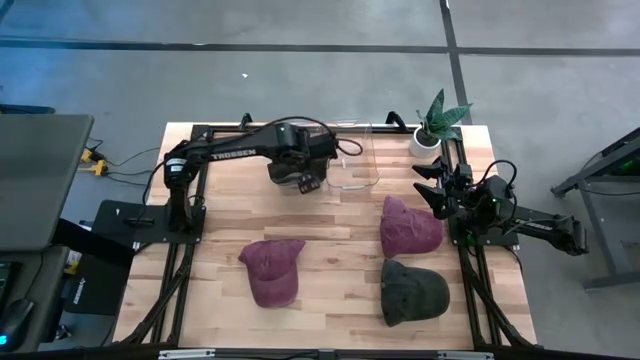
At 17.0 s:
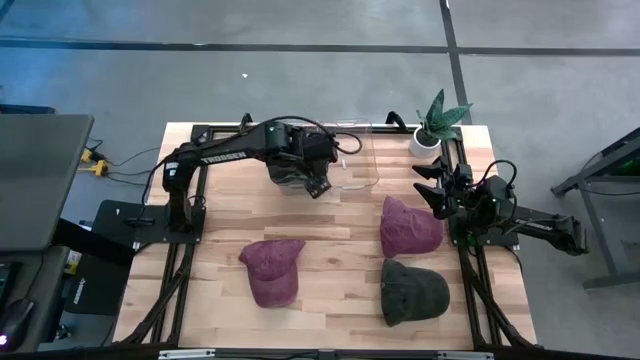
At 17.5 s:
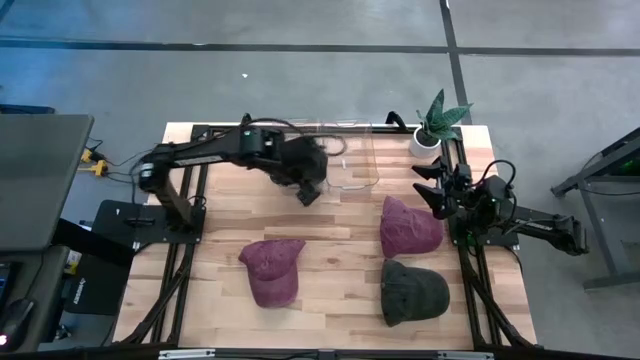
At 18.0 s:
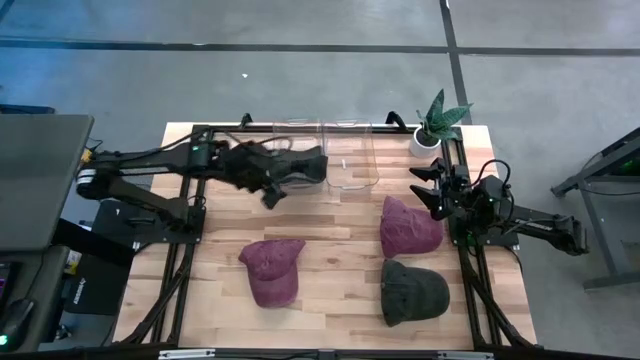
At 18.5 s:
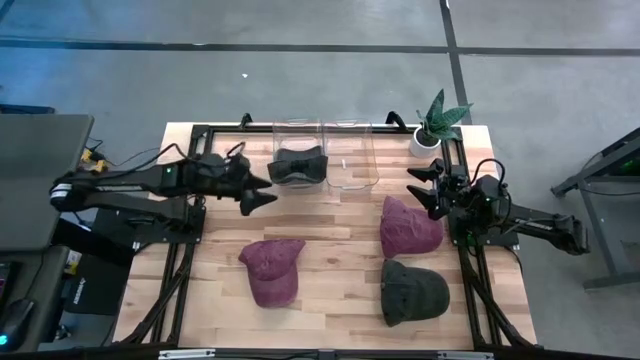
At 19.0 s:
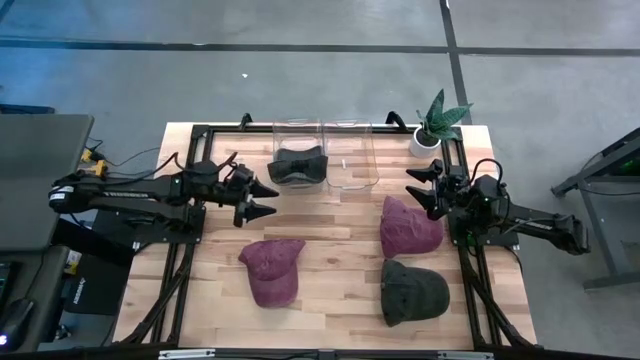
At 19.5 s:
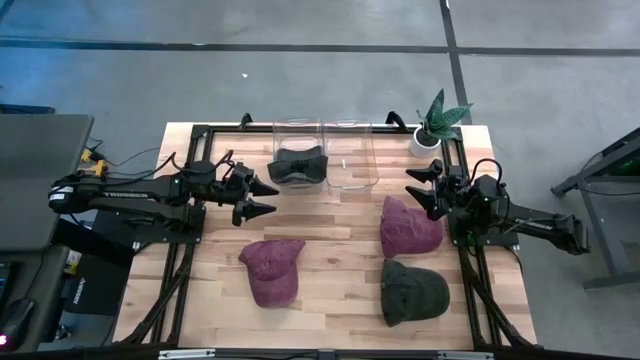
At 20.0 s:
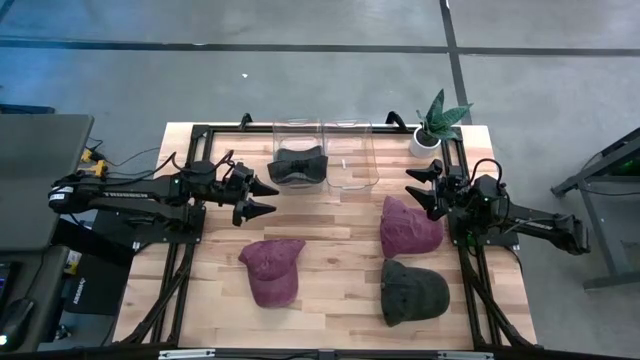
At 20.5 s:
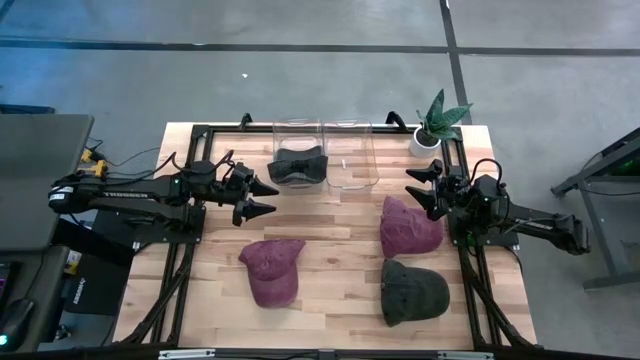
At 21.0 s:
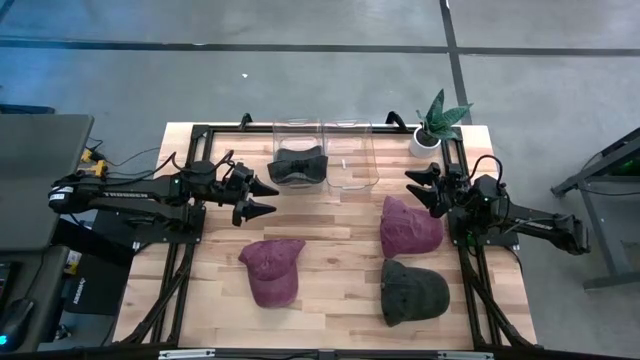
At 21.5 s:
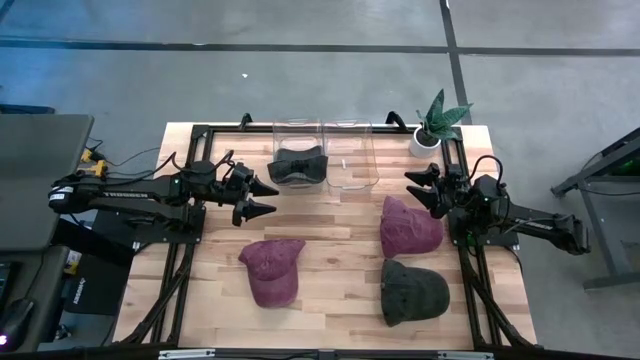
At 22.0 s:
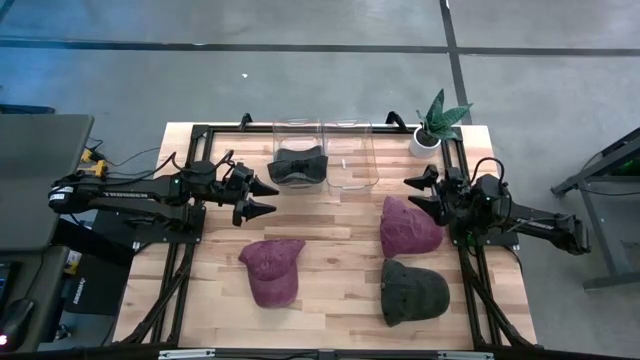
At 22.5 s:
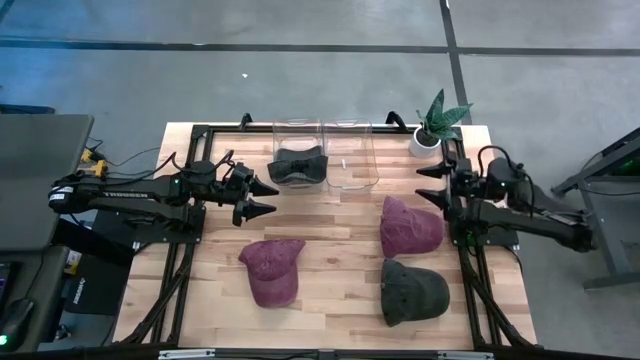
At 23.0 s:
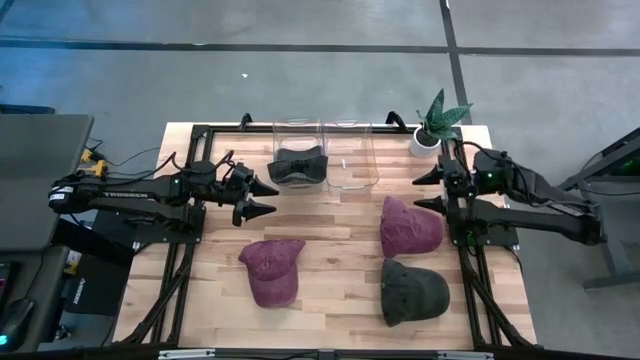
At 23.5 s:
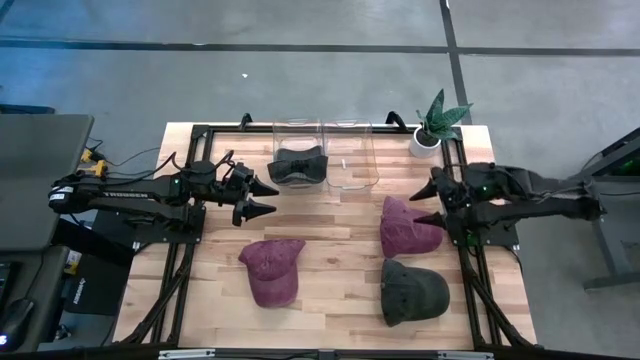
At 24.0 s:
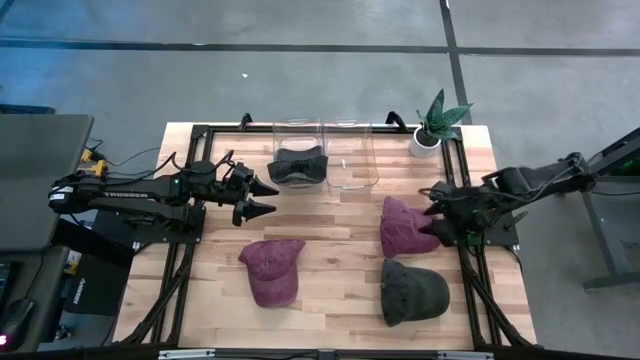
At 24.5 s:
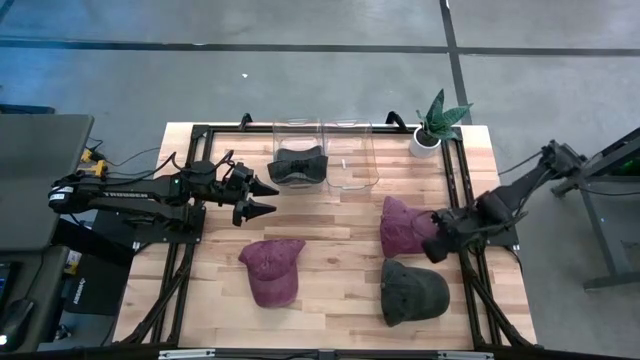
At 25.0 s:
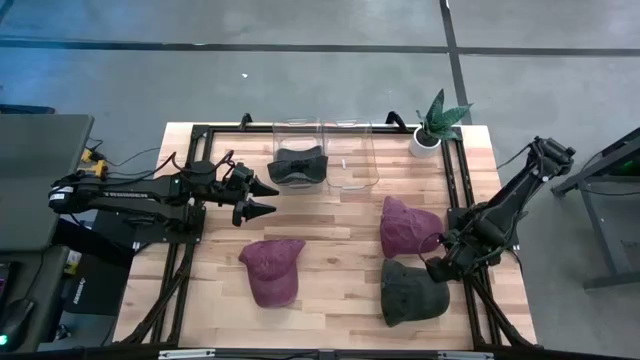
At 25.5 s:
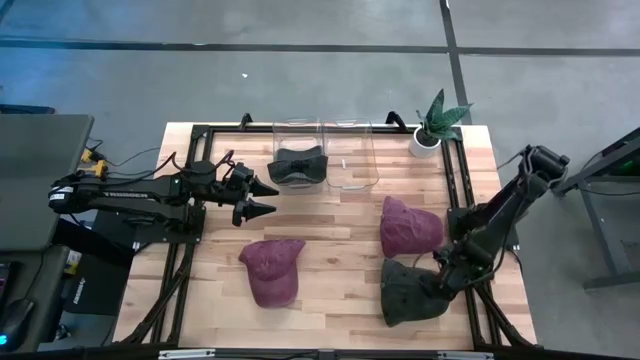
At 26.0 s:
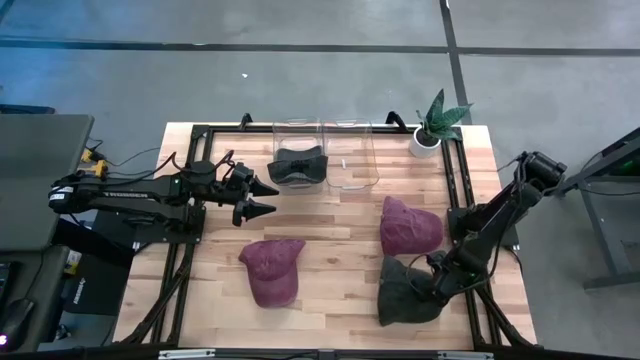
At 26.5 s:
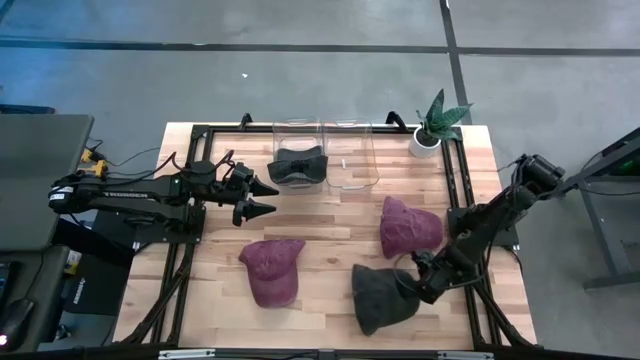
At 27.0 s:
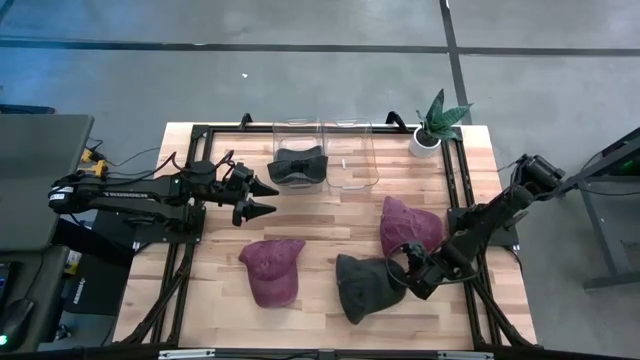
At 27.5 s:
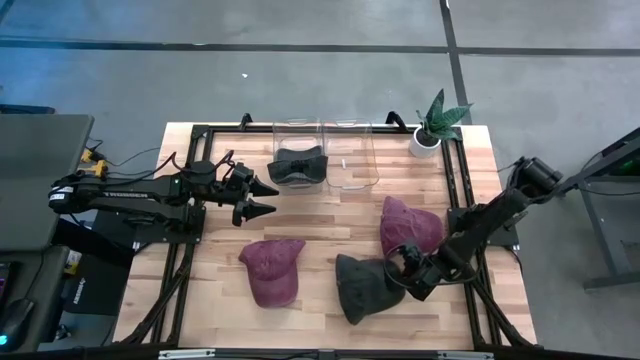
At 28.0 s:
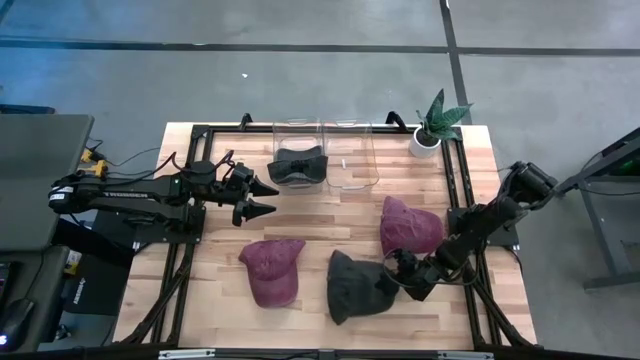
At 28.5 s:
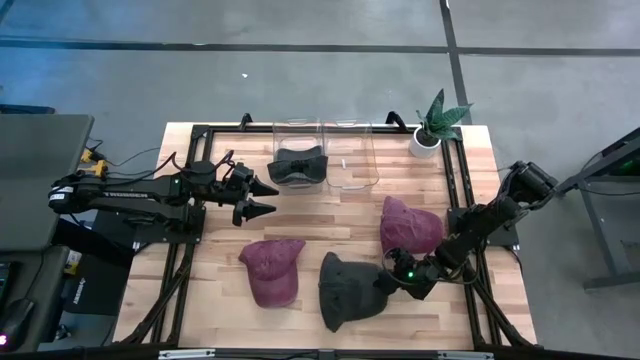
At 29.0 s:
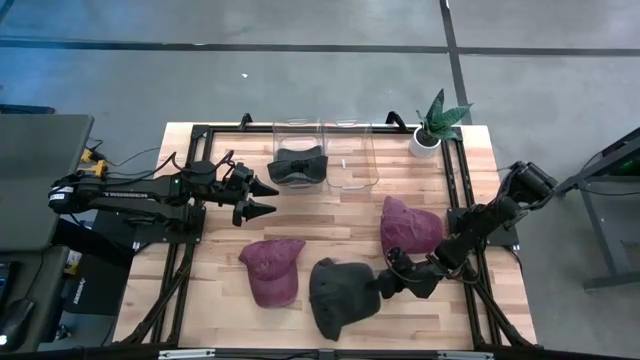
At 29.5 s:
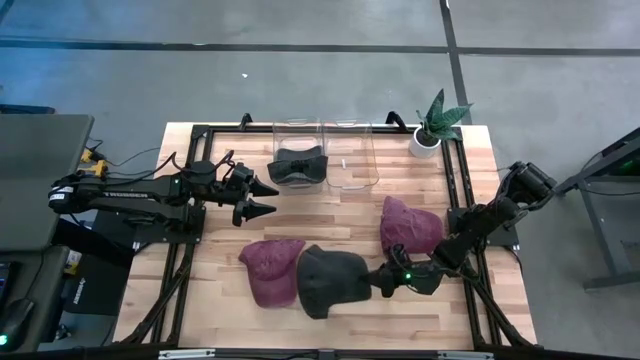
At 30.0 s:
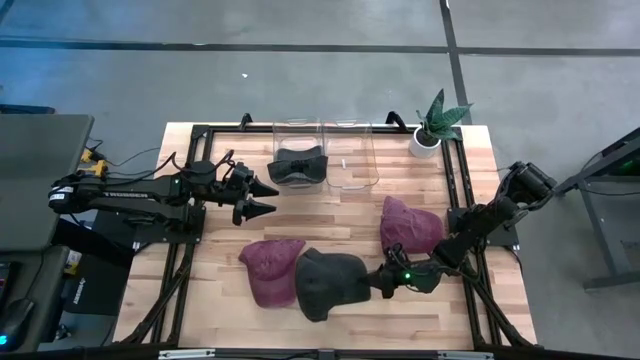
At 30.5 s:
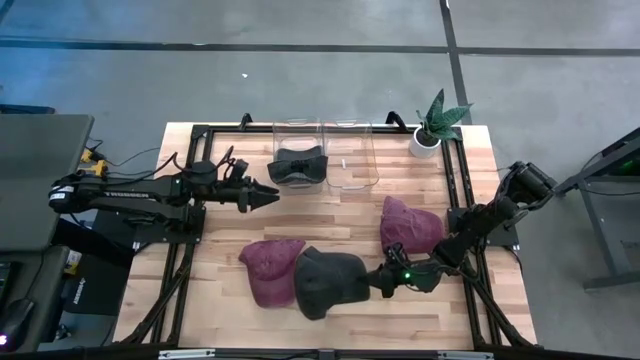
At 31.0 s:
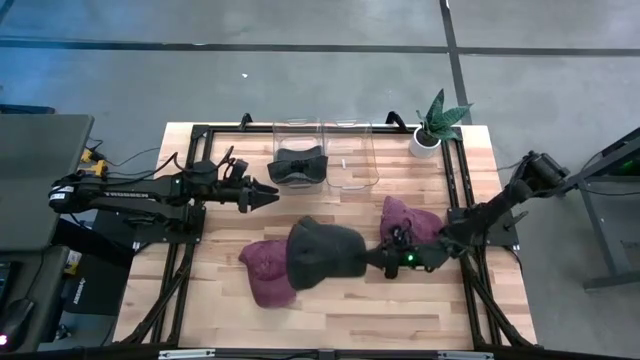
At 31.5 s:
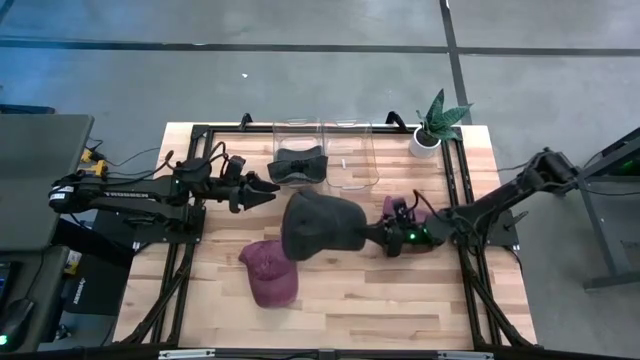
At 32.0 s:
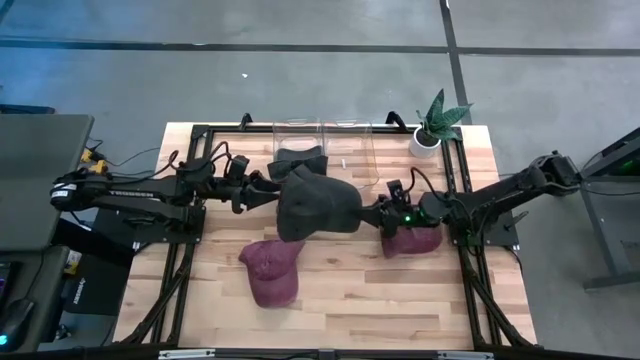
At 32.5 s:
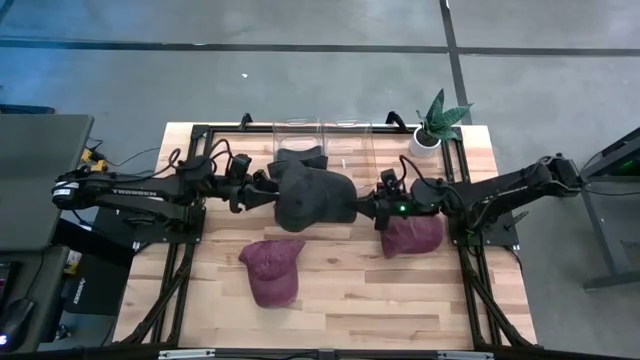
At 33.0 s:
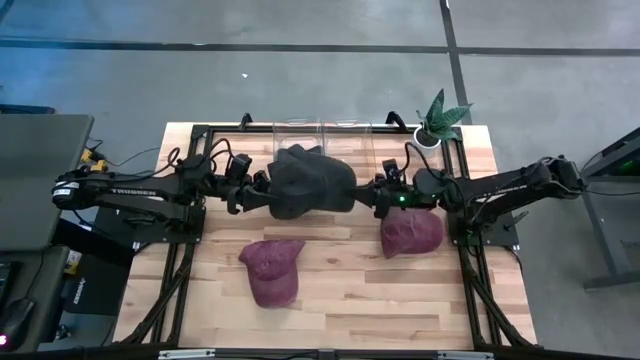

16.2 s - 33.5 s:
Task: Pick & Place hat
Put the black cap into the left transparent bin

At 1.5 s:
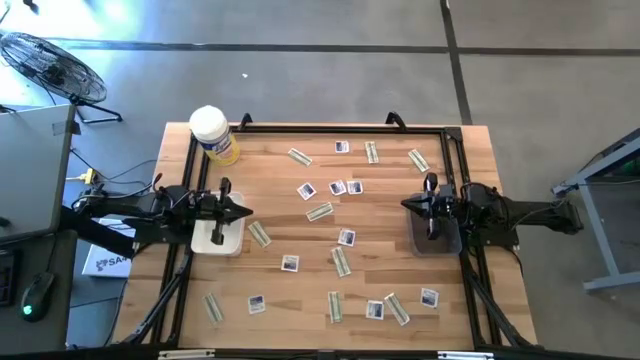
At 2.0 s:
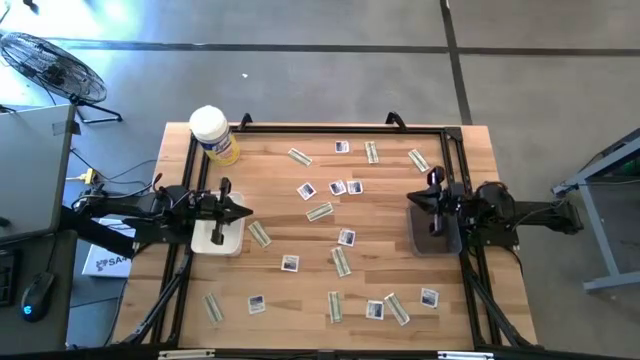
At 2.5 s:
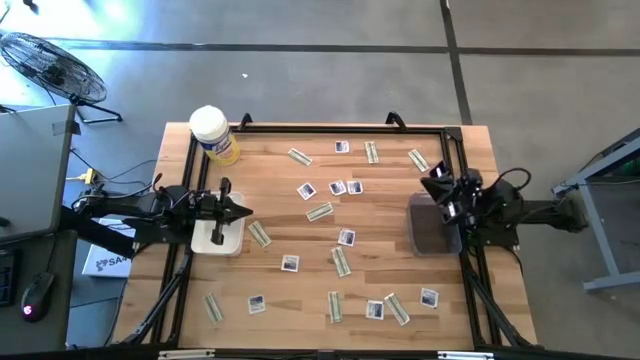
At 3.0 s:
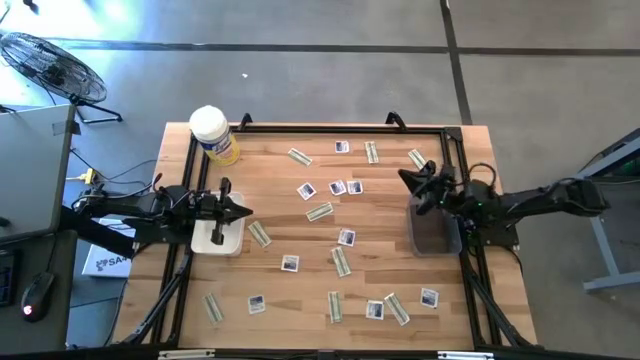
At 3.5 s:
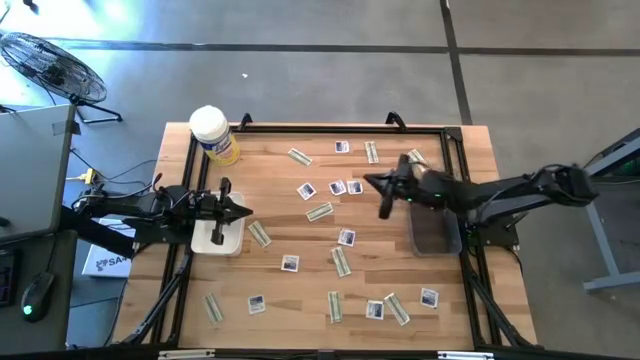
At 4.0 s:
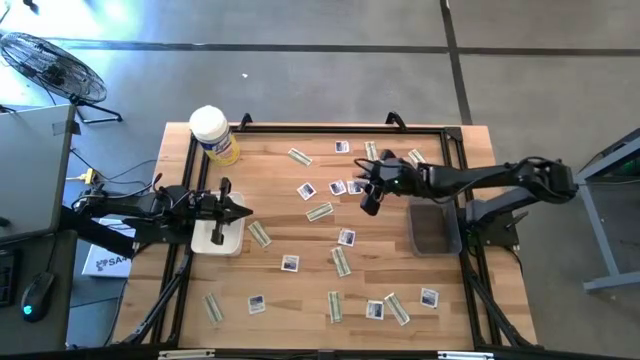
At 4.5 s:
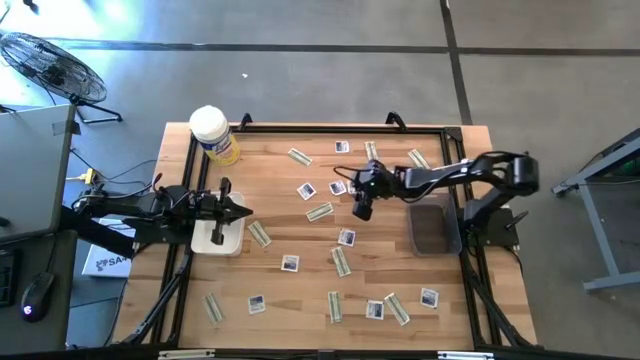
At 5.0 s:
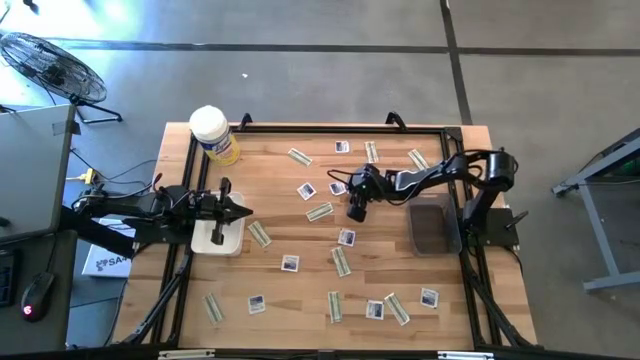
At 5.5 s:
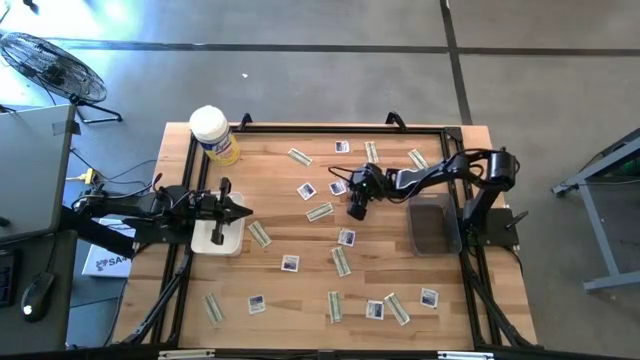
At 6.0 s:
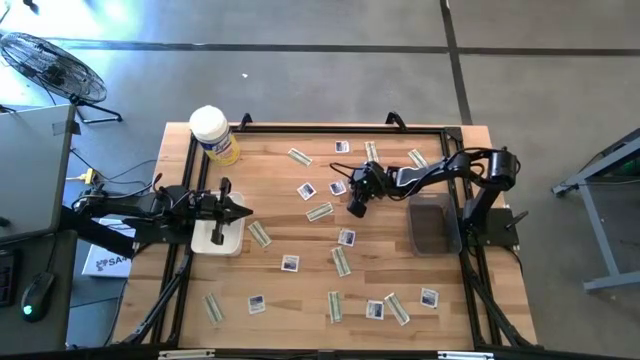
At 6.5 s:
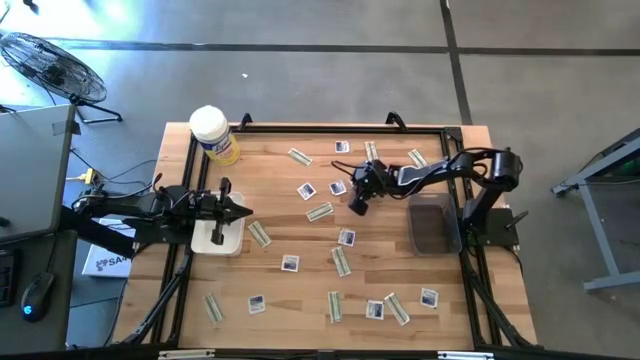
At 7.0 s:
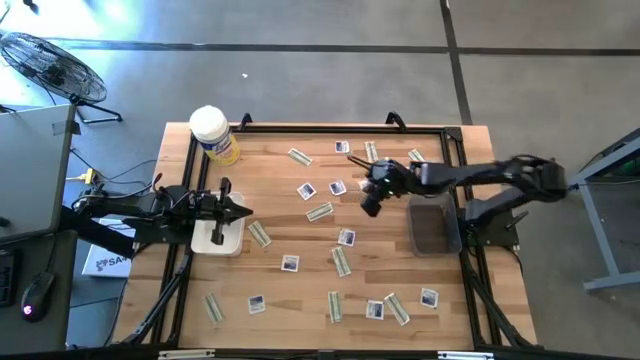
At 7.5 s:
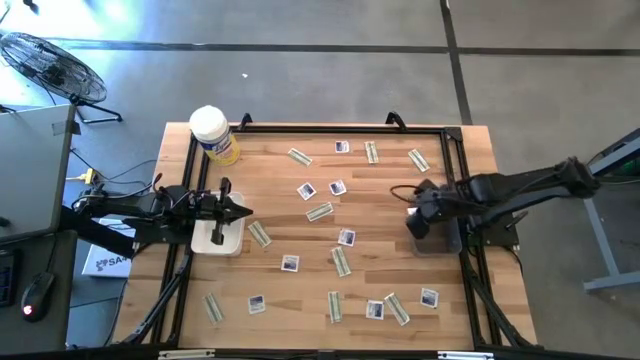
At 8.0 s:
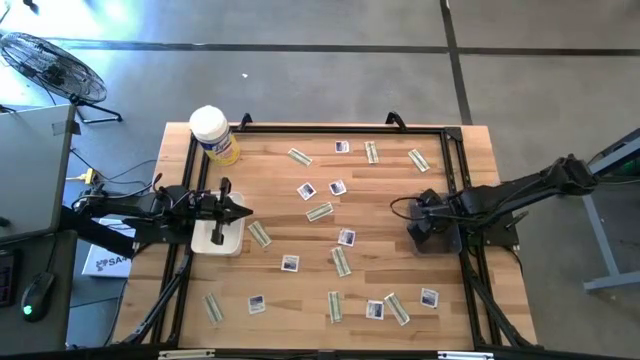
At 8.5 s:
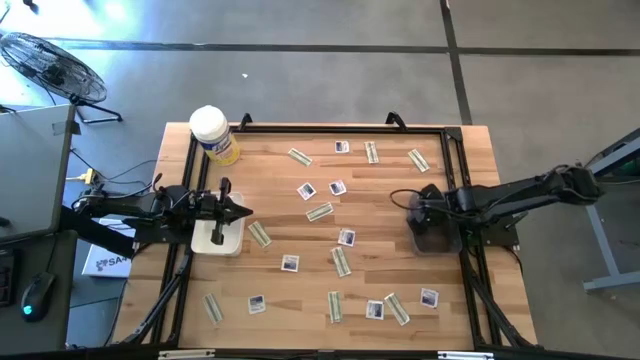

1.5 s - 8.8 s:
Task: Pick & Place First Aid Supplies
Put the blue alcohol pad into the black bin
